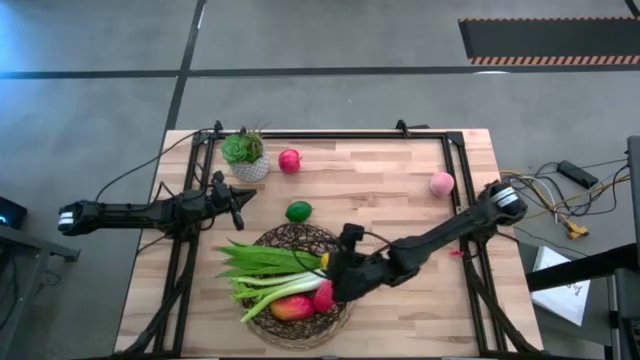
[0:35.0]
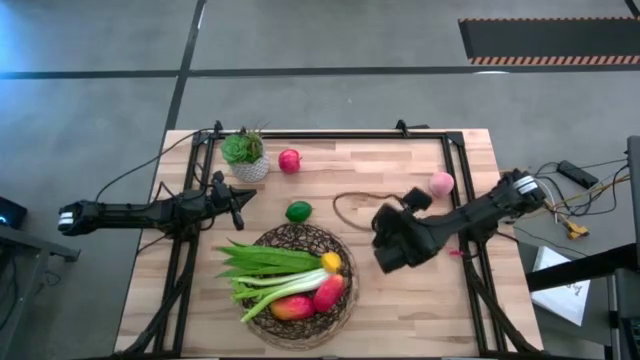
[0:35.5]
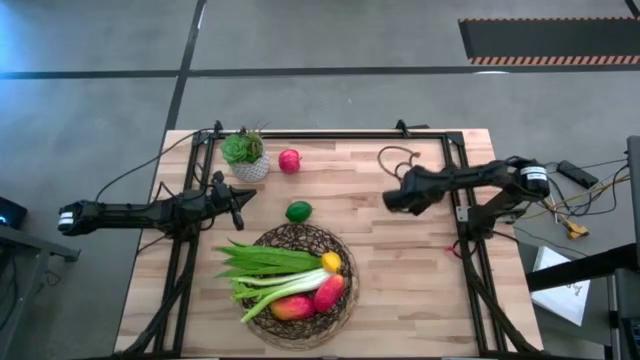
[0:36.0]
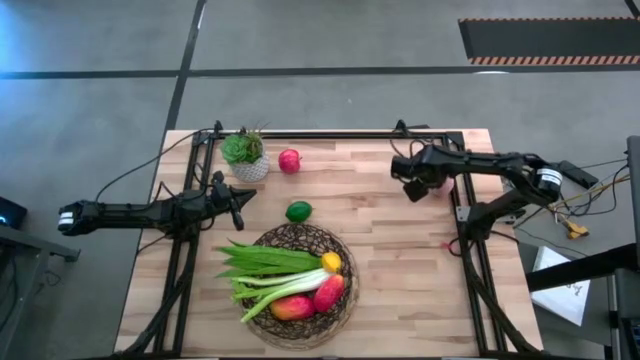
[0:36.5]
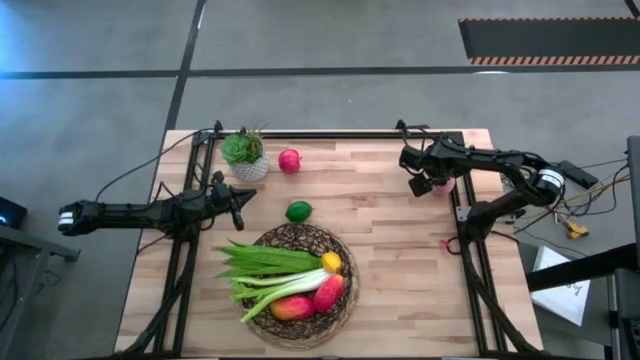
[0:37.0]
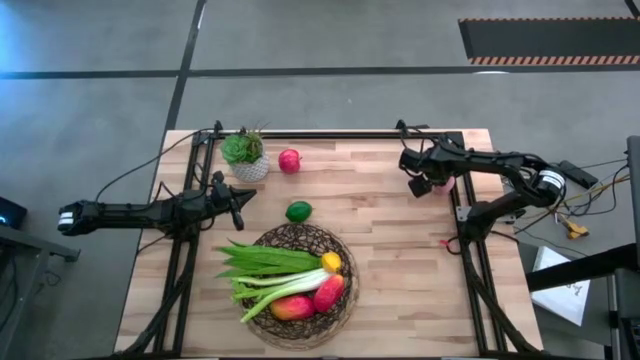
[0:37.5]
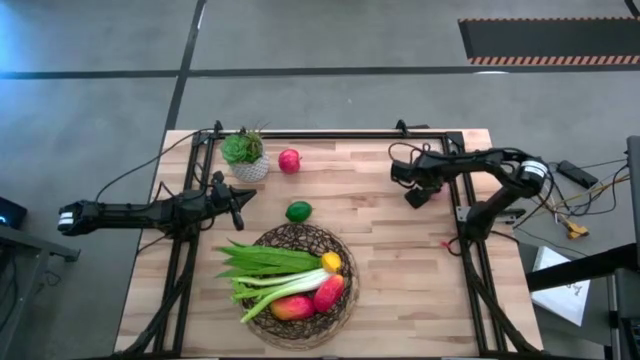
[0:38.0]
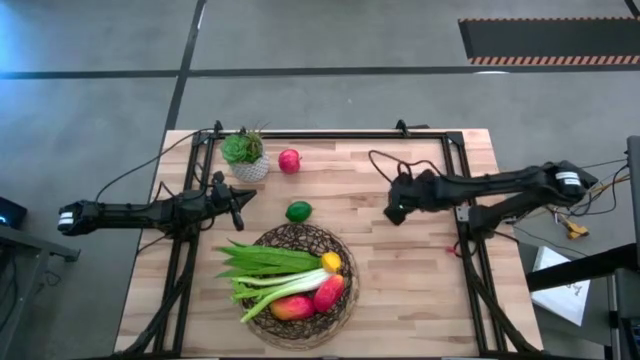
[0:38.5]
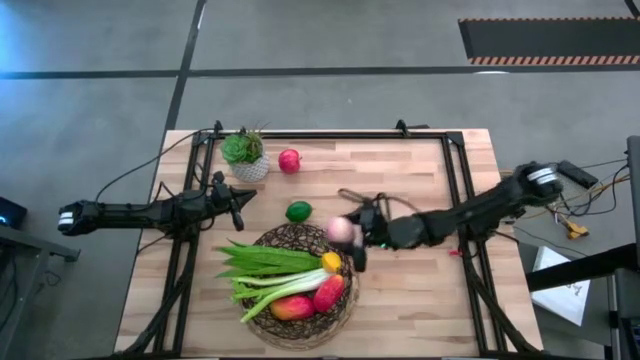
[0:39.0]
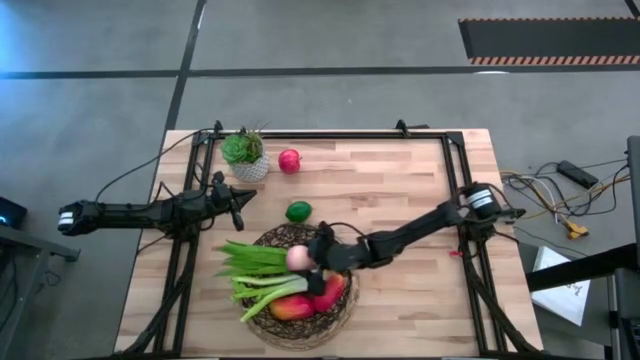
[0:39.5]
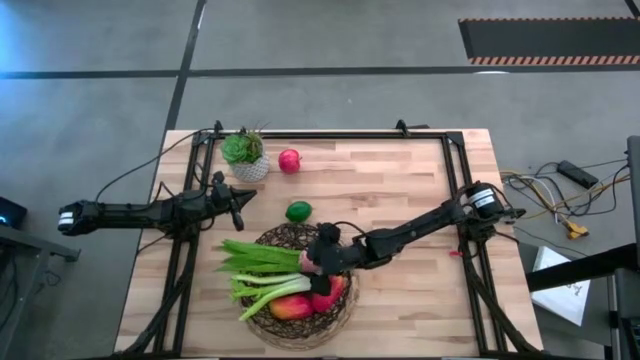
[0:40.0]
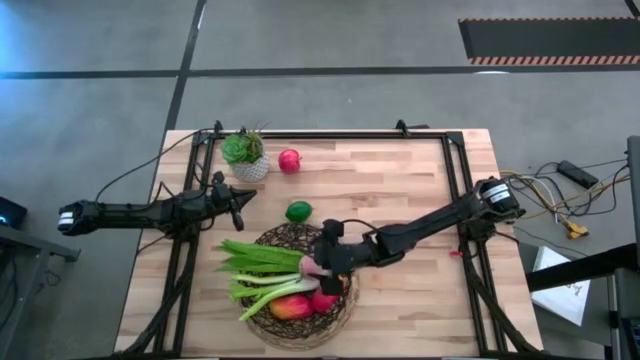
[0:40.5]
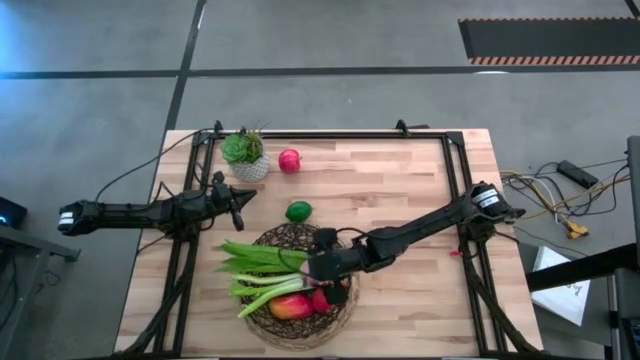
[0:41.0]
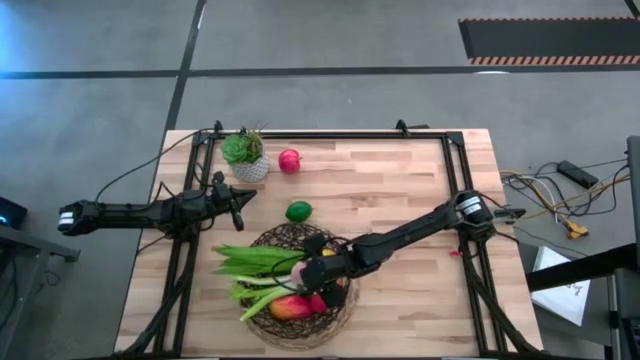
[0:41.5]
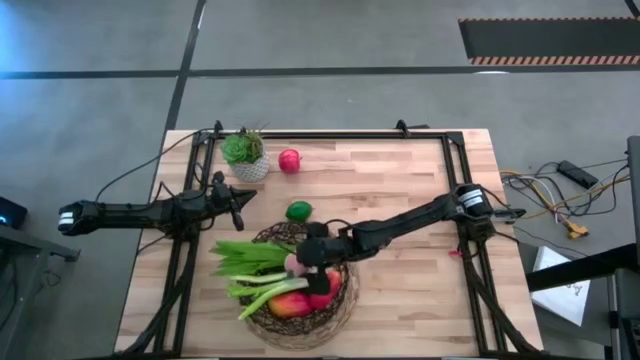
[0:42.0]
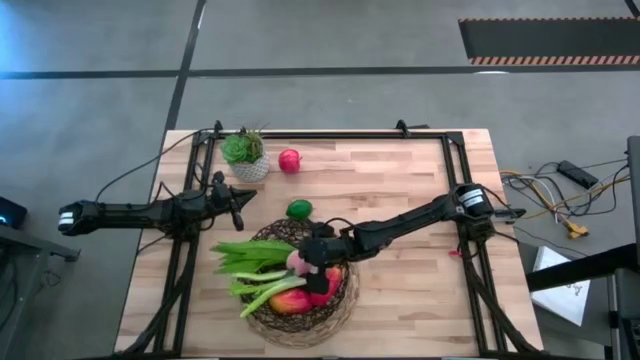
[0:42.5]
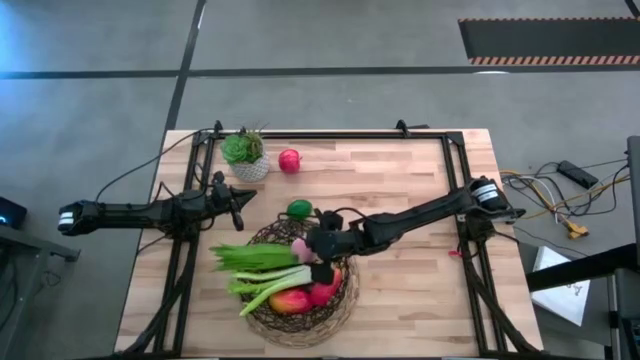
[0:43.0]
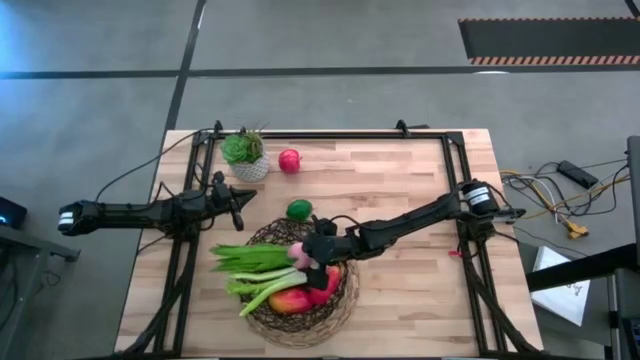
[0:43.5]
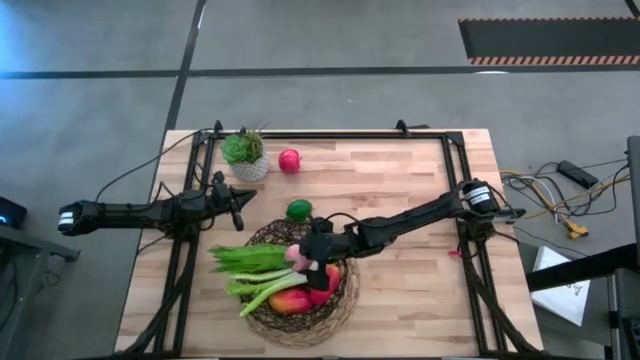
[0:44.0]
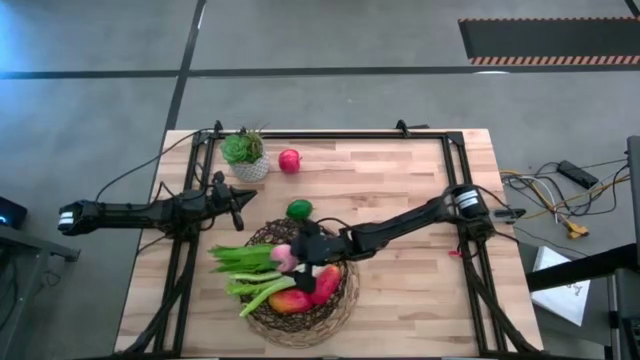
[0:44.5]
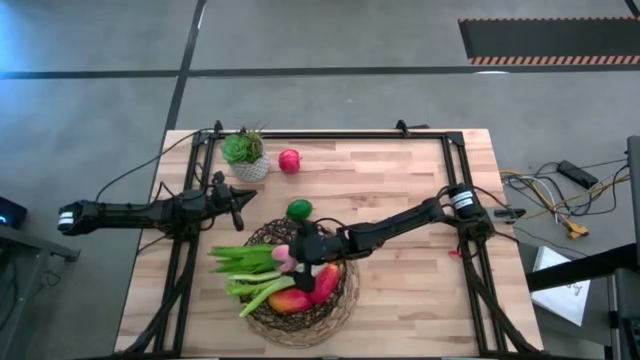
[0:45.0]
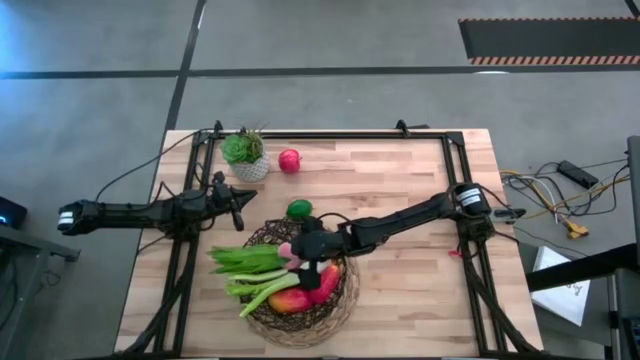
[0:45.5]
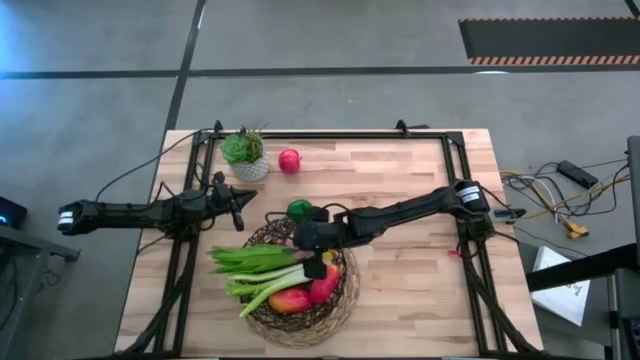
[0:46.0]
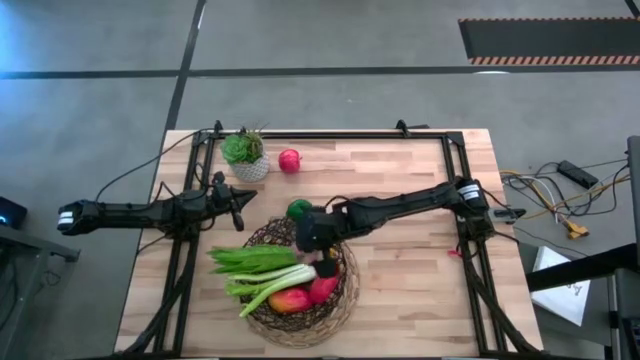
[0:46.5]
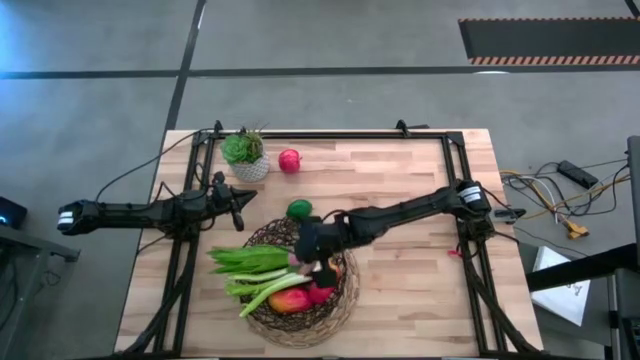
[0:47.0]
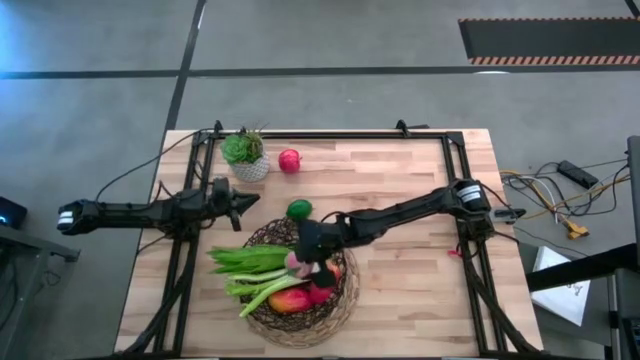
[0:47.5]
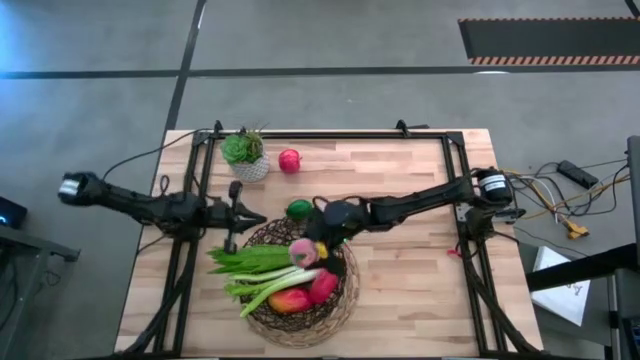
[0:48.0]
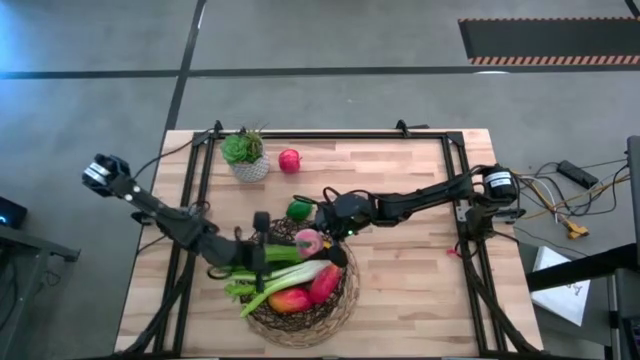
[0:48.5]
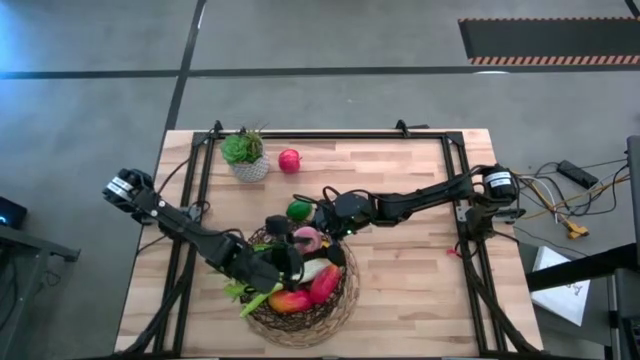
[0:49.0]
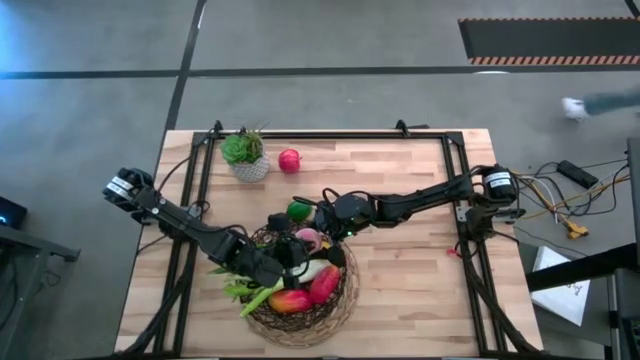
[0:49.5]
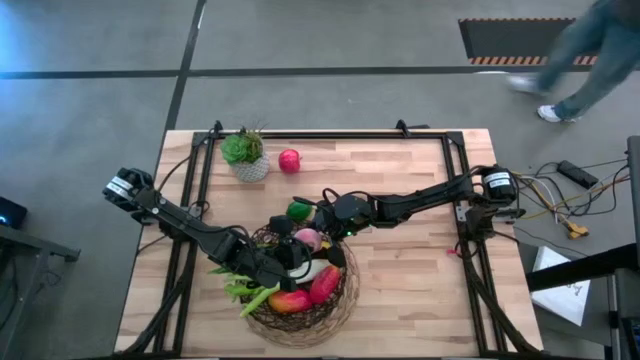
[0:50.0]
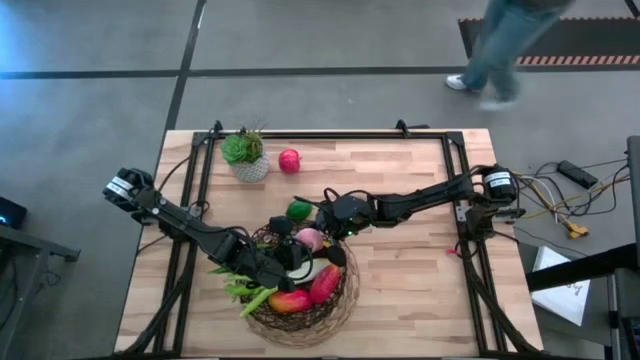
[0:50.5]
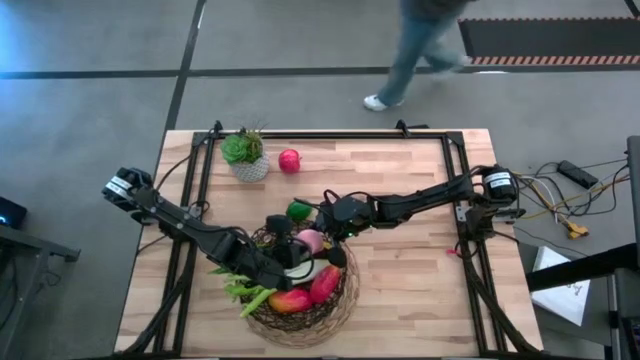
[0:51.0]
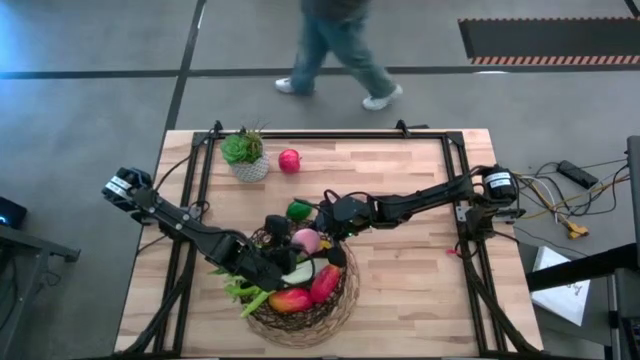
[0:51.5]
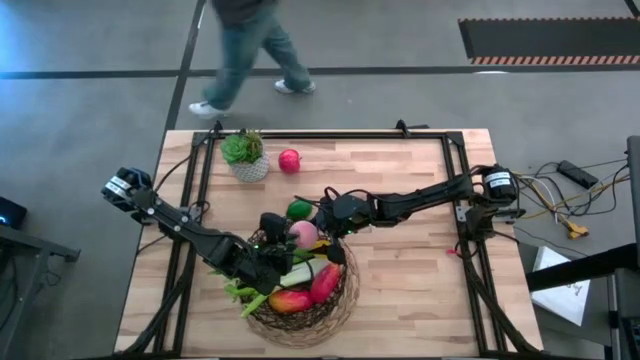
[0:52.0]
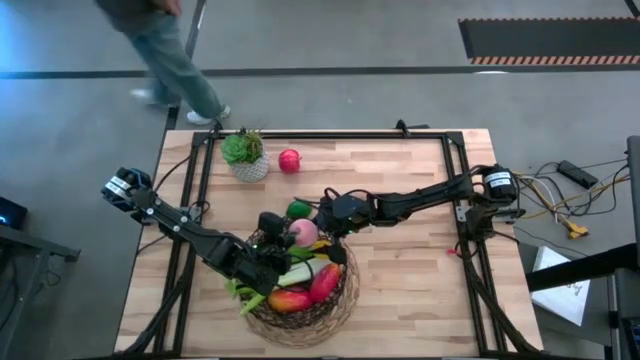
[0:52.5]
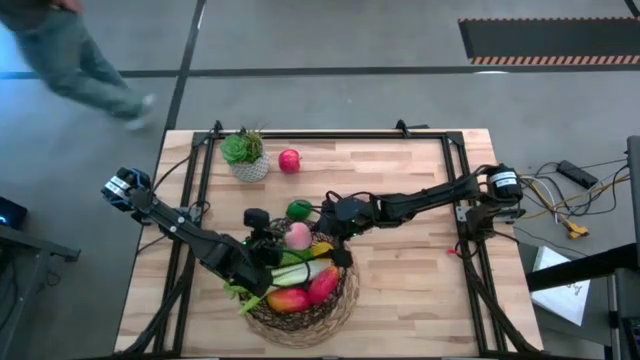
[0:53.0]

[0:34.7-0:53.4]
Task: Build produce basket
Put the peach into the mesh basket
